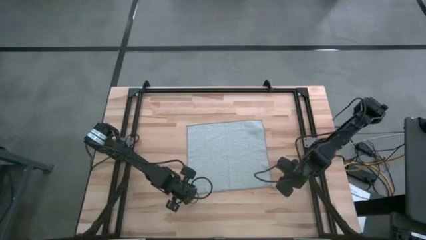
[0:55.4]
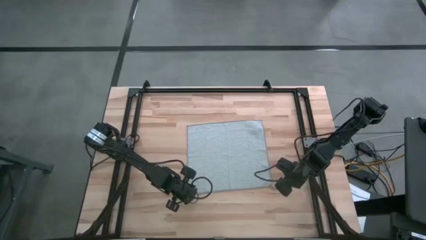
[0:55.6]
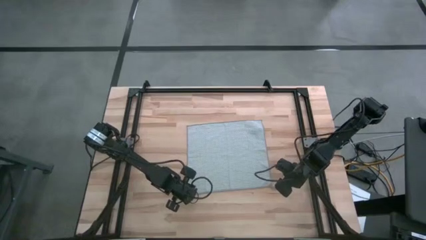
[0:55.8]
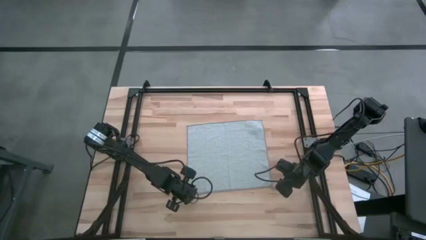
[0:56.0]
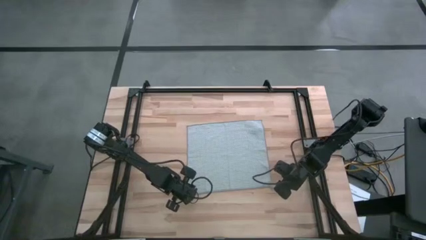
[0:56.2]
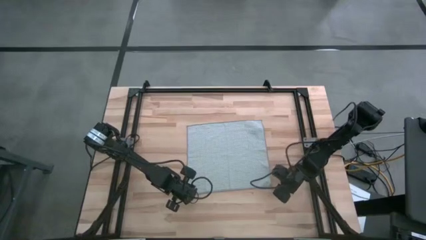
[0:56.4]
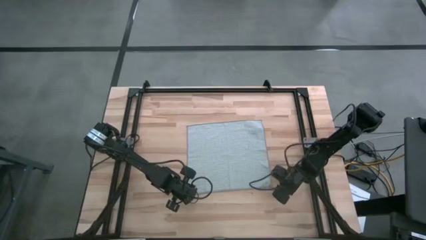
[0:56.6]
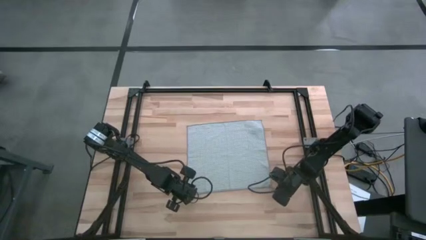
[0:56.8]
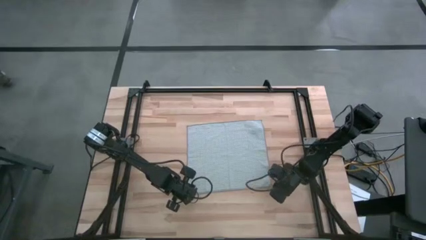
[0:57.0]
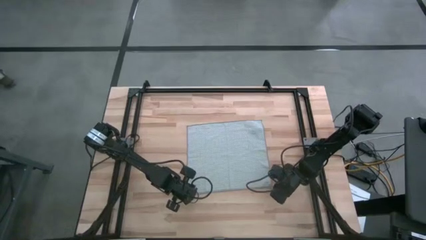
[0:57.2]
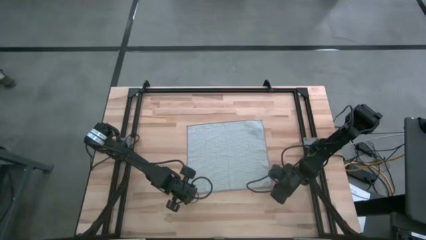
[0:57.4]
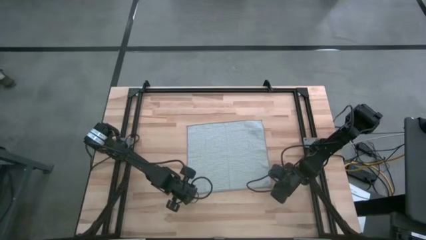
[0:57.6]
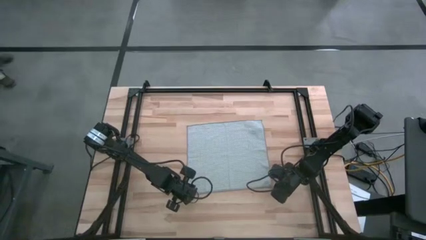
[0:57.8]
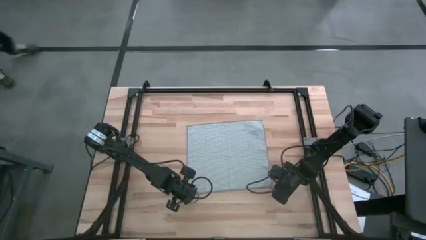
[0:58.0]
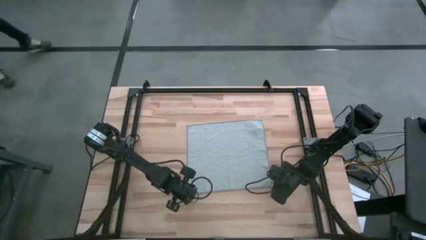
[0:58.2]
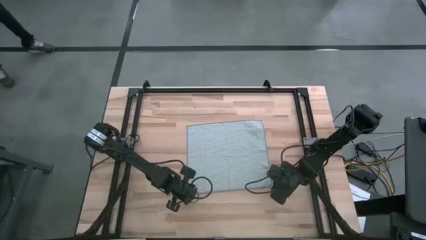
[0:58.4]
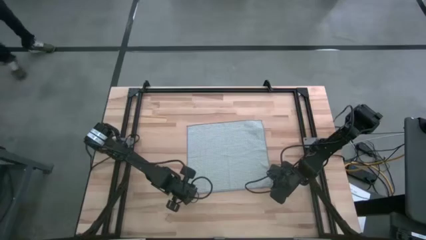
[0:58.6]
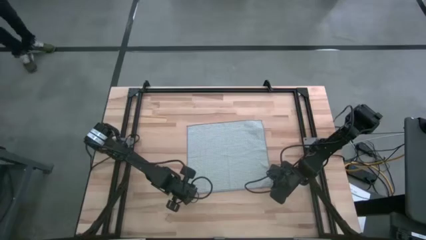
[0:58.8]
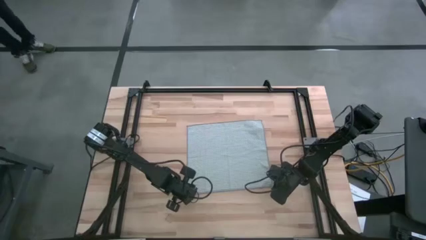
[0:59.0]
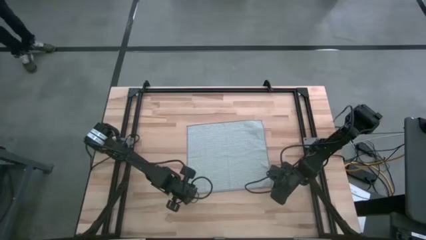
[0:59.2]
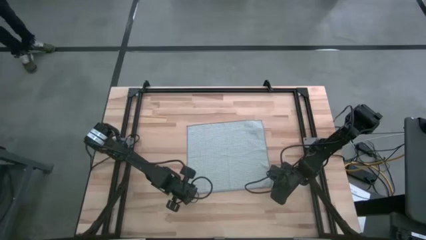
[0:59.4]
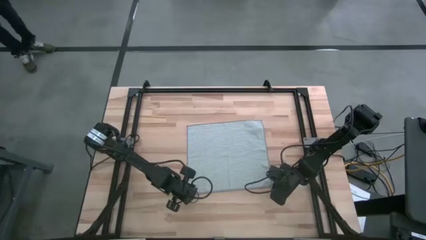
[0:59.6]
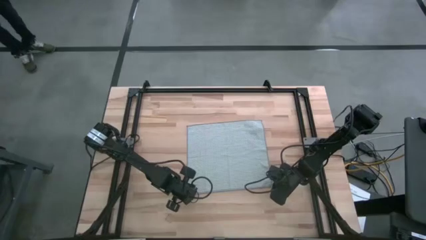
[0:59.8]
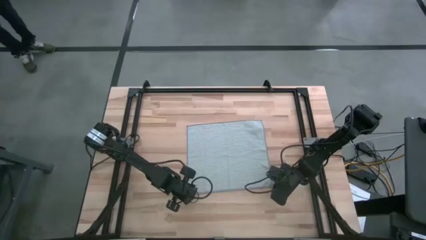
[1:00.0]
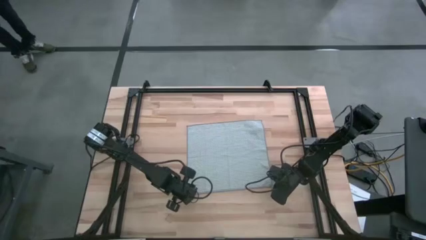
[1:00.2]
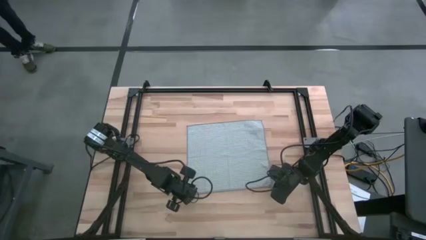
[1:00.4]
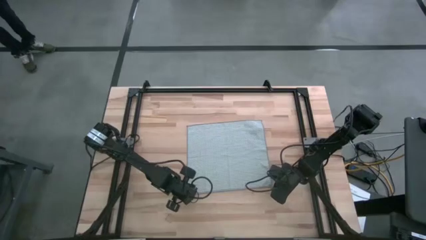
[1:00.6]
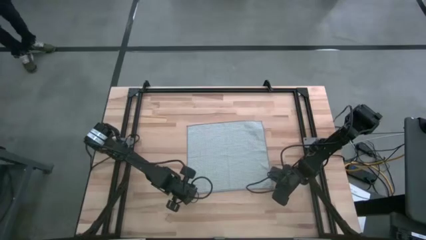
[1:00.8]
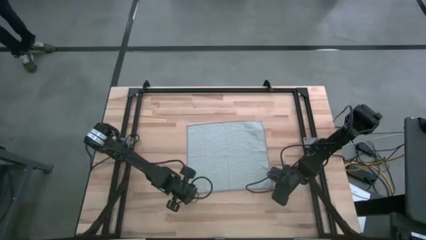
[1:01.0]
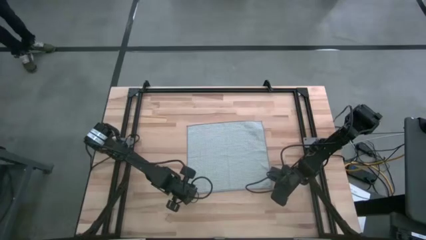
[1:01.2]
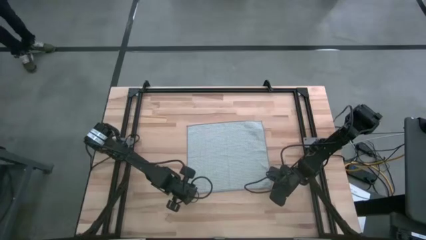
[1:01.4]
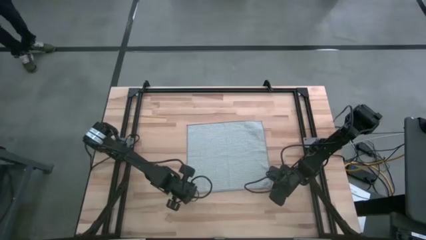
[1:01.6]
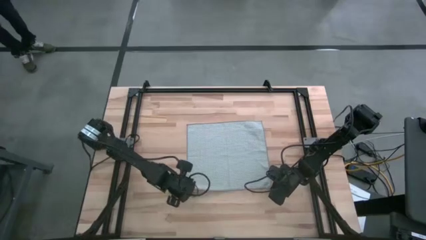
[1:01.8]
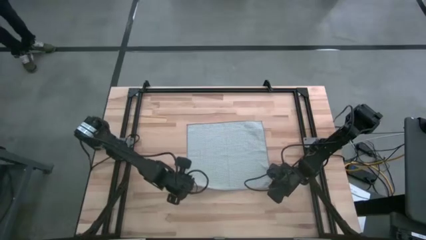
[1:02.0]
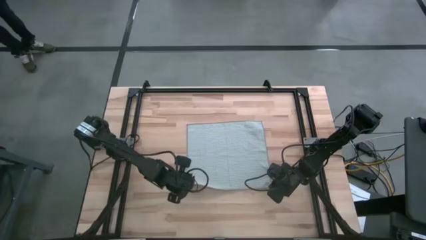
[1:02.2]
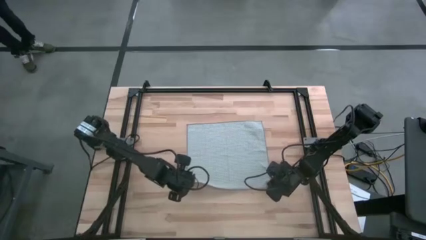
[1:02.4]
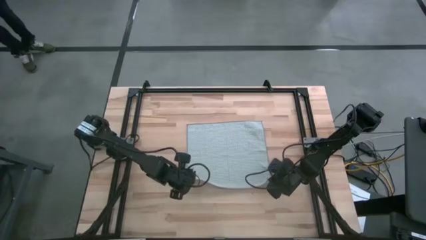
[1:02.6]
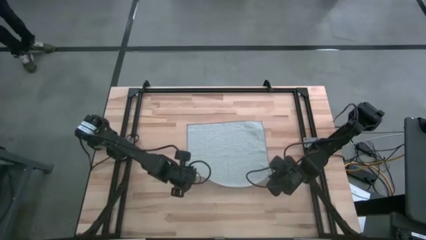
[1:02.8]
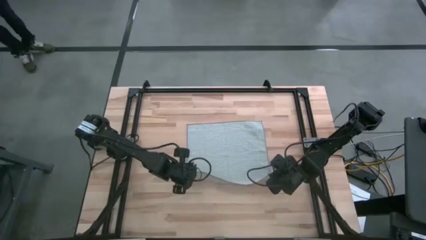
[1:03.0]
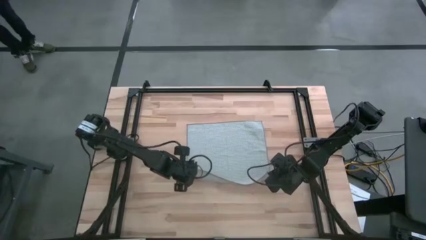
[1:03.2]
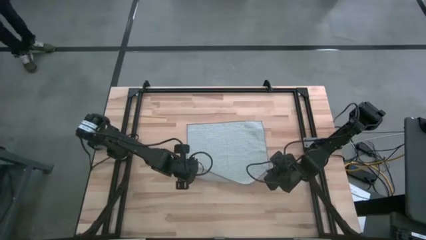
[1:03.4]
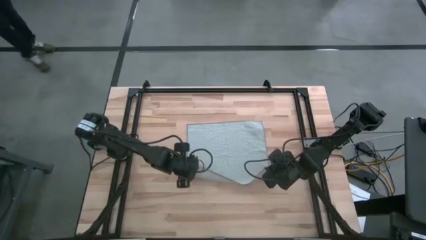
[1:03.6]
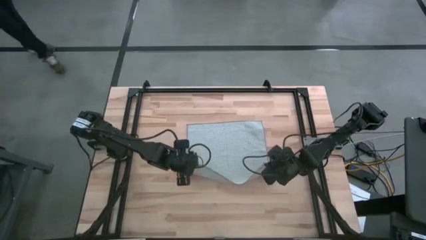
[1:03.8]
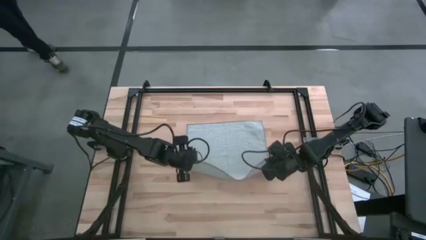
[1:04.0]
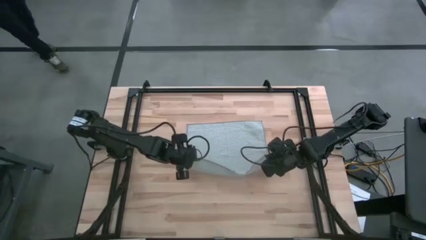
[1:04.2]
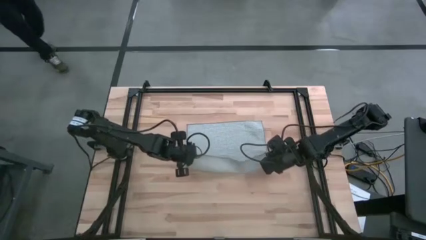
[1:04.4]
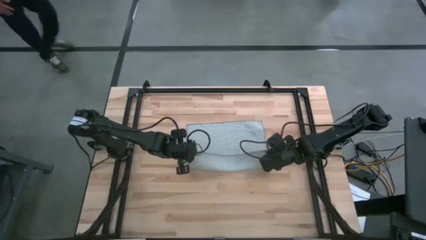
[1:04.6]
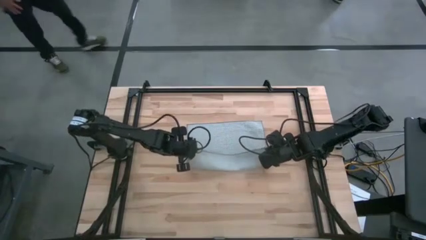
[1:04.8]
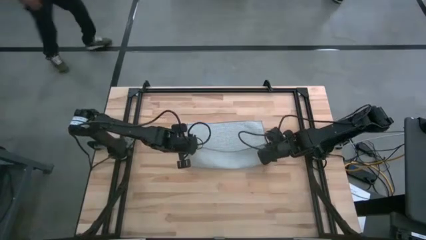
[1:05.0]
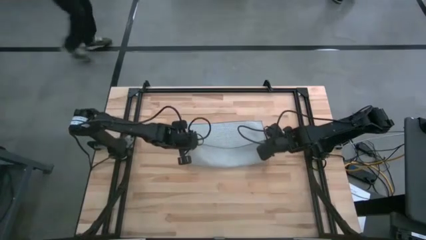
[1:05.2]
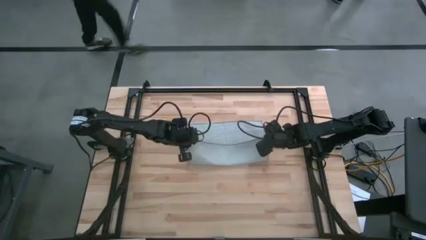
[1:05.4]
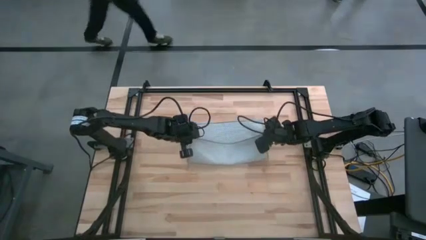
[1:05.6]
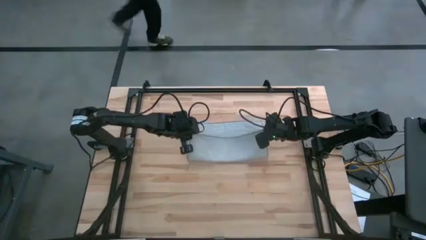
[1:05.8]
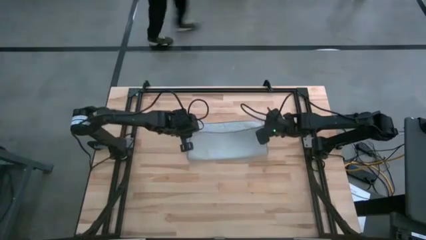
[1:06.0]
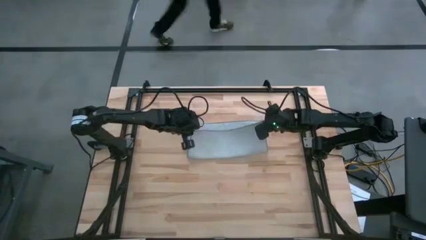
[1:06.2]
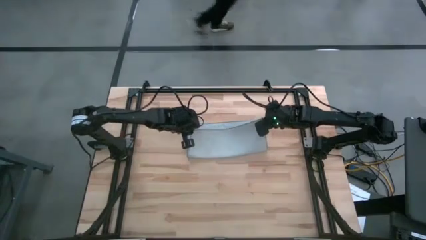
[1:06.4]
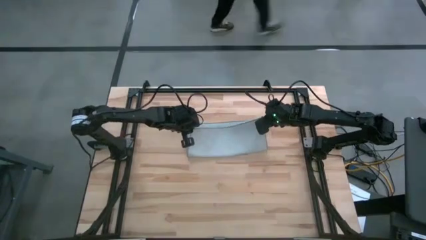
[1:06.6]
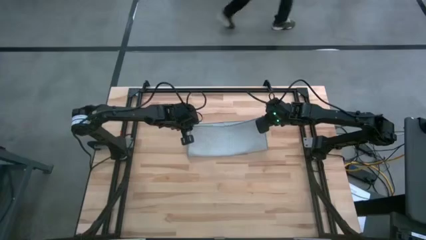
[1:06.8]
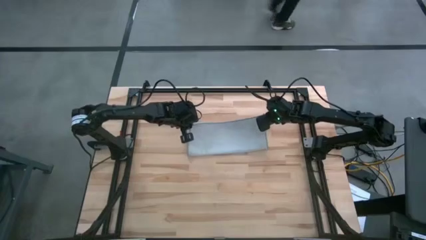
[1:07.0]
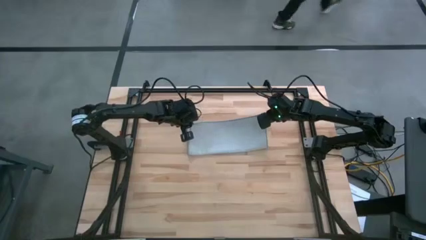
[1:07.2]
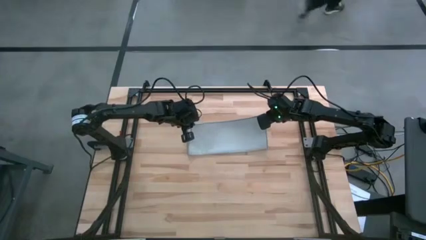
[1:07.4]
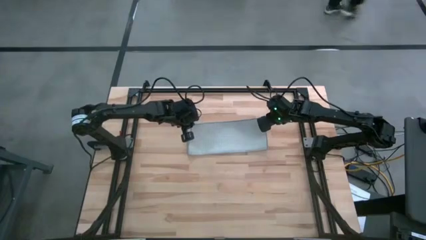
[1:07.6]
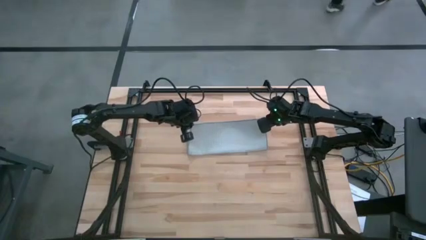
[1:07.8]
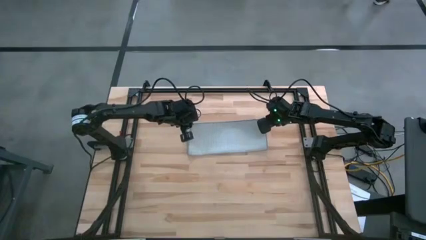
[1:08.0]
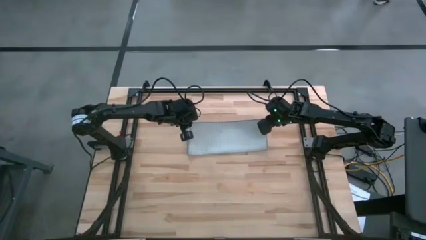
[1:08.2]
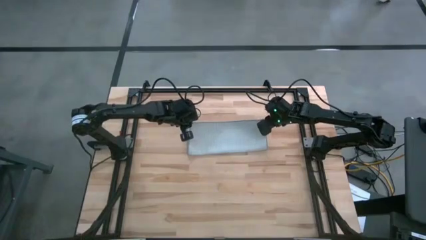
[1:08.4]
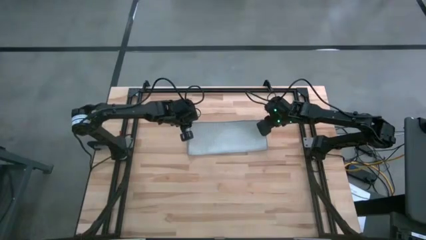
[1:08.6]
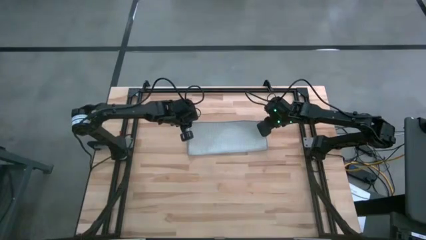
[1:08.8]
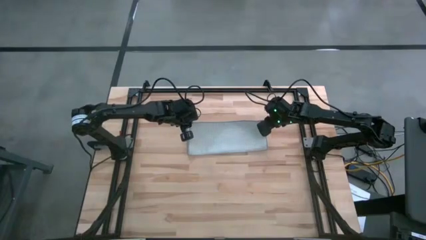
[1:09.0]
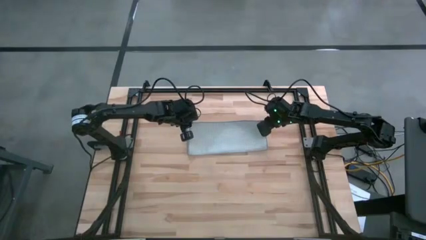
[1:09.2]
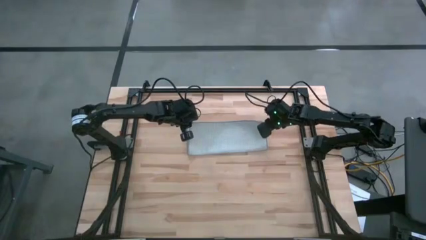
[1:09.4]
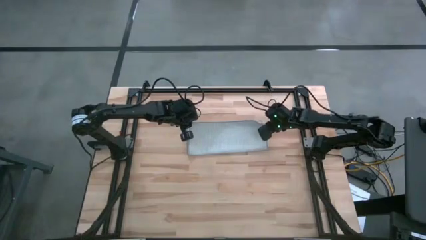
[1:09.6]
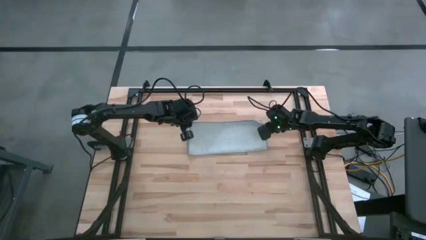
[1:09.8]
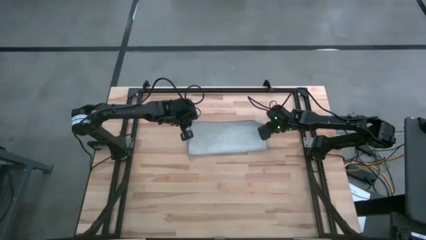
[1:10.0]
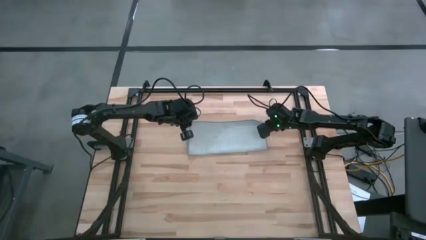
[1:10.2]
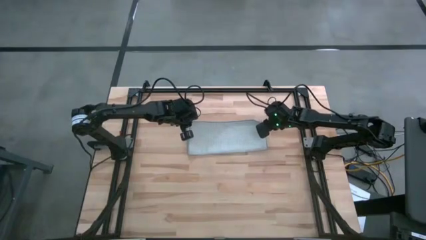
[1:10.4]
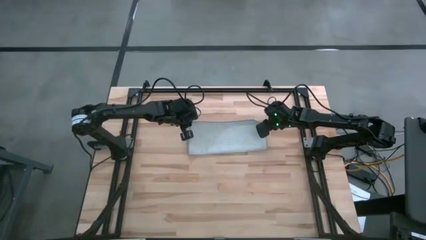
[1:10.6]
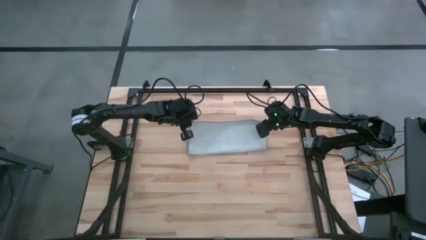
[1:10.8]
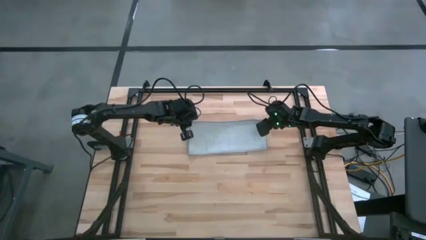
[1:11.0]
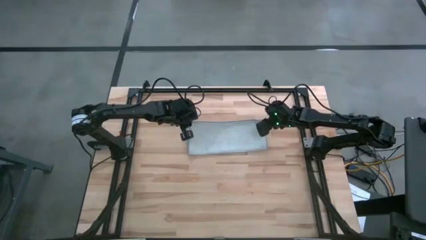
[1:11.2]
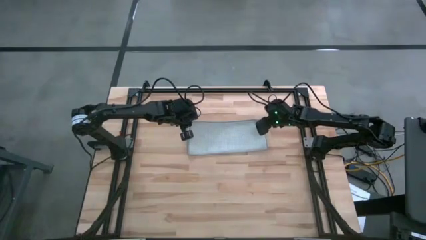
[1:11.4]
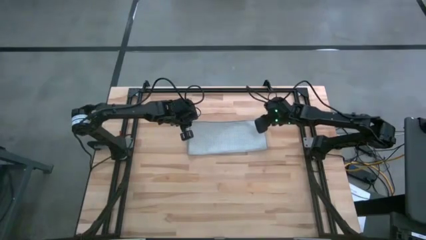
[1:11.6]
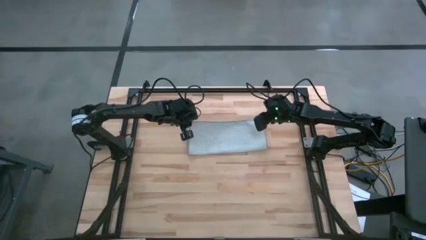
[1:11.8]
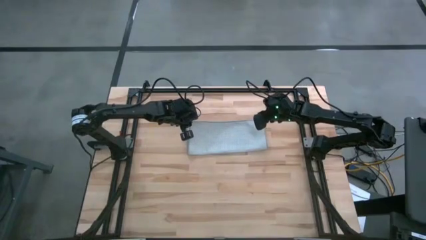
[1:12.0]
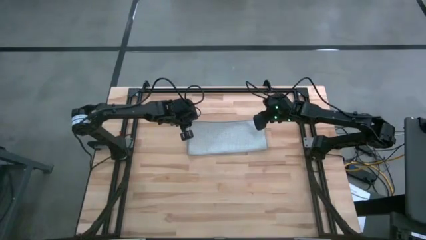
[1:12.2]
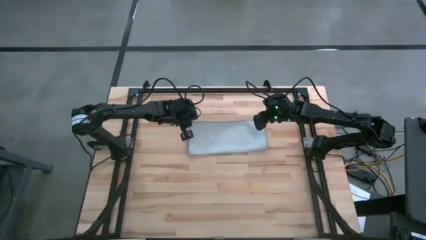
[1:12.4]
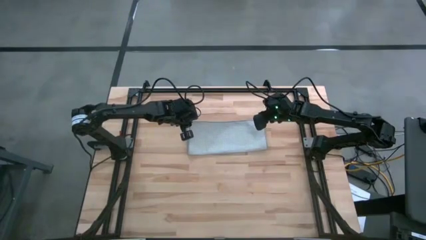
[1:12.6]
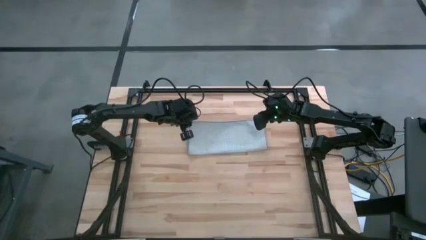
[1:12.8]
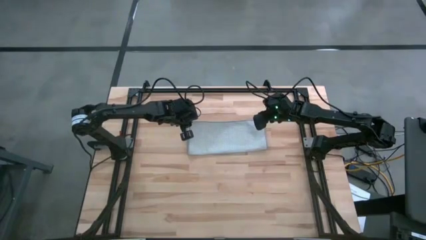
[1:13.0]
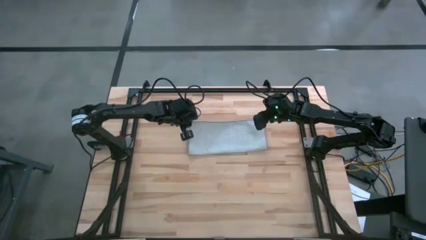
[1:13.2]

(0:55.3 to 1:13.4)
Task: Fold microfiber towels
Fold the gray on the table
